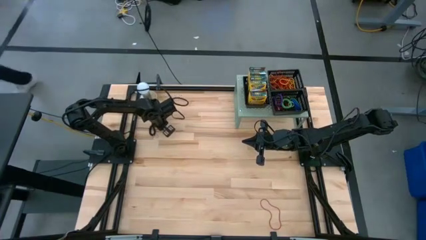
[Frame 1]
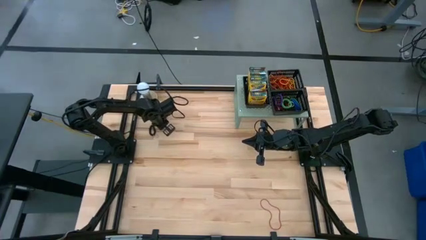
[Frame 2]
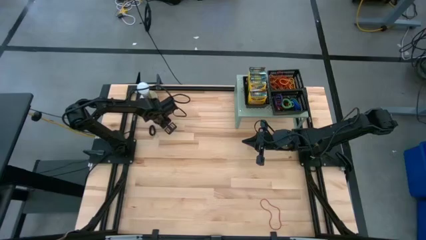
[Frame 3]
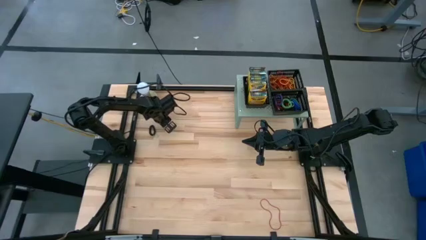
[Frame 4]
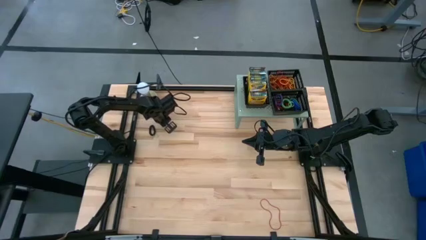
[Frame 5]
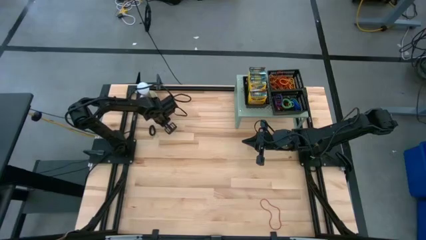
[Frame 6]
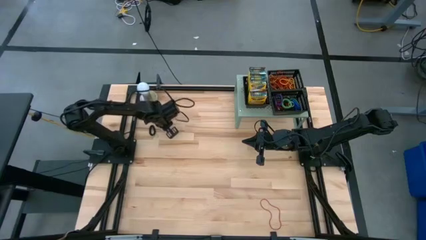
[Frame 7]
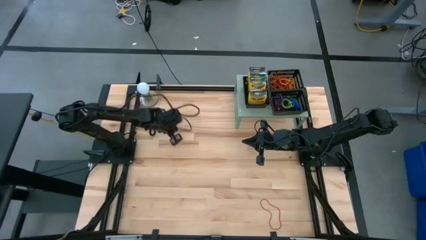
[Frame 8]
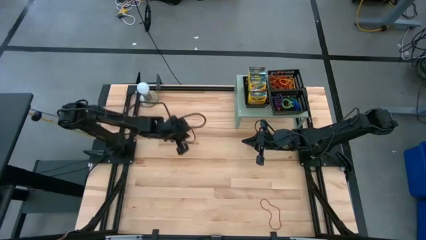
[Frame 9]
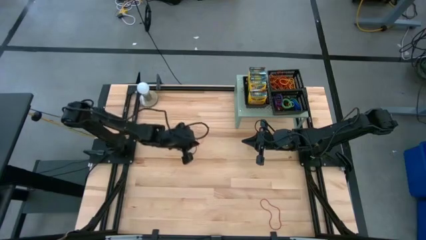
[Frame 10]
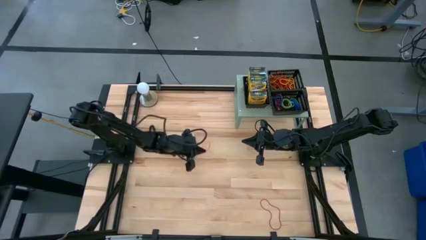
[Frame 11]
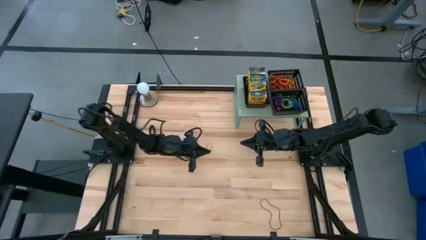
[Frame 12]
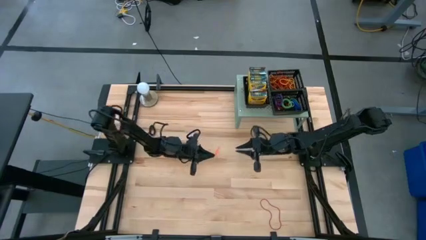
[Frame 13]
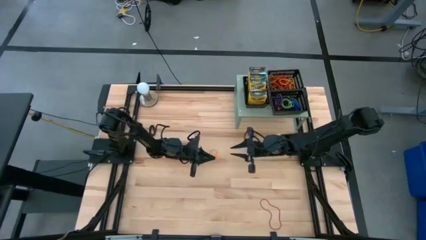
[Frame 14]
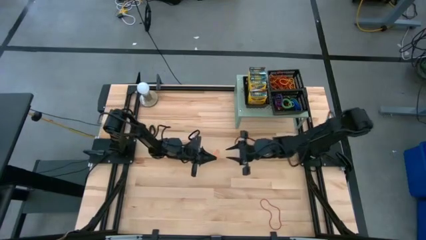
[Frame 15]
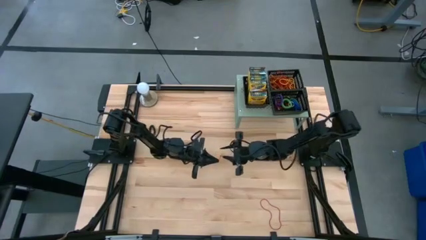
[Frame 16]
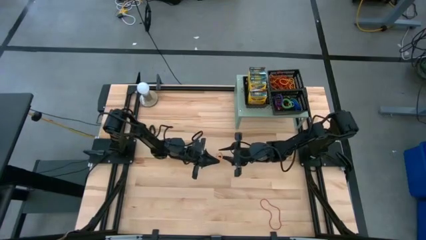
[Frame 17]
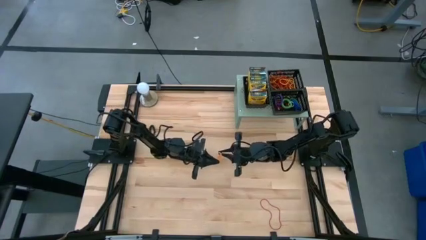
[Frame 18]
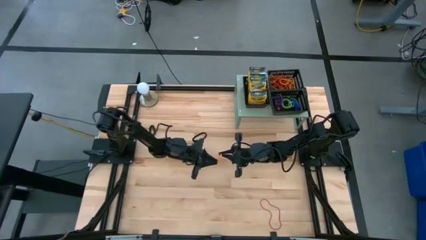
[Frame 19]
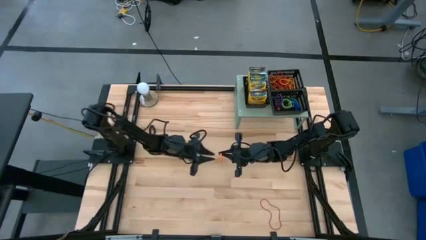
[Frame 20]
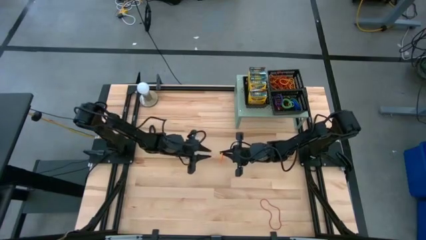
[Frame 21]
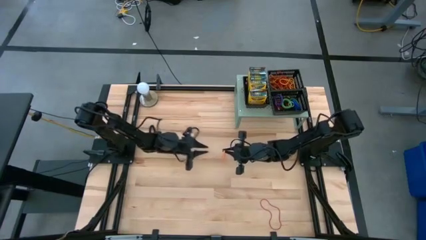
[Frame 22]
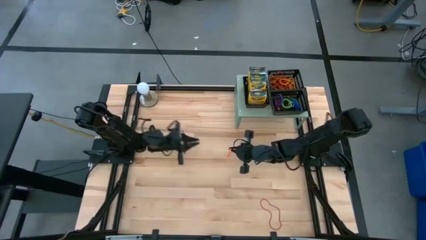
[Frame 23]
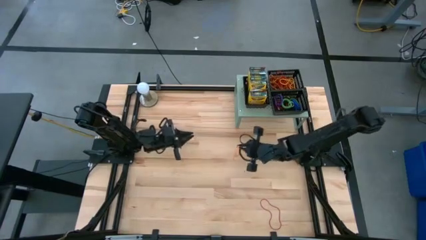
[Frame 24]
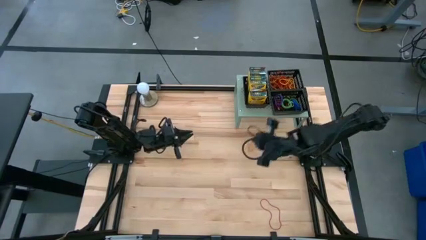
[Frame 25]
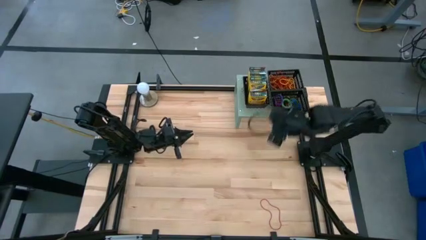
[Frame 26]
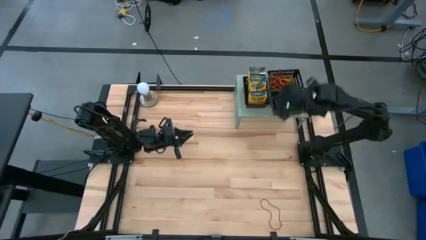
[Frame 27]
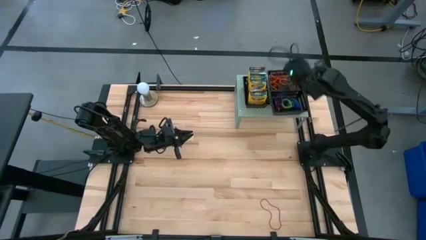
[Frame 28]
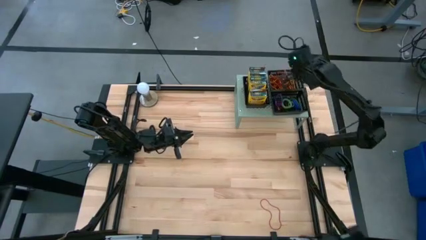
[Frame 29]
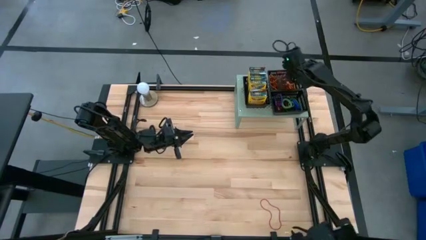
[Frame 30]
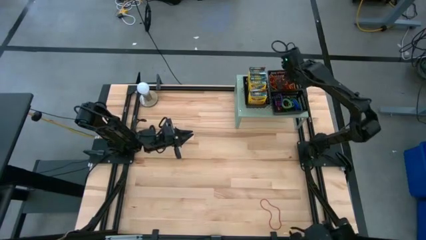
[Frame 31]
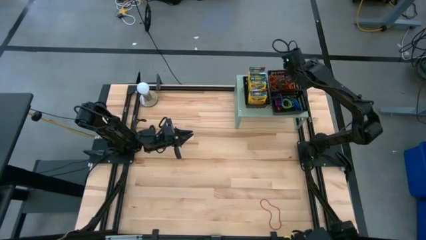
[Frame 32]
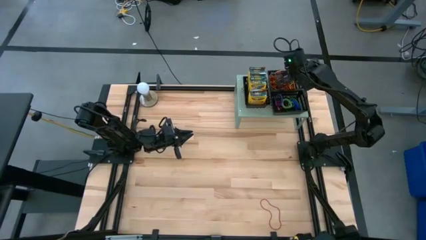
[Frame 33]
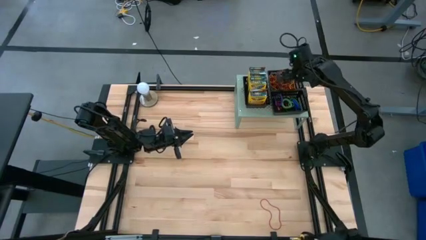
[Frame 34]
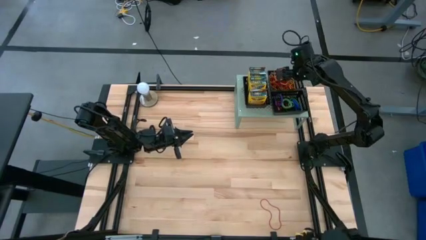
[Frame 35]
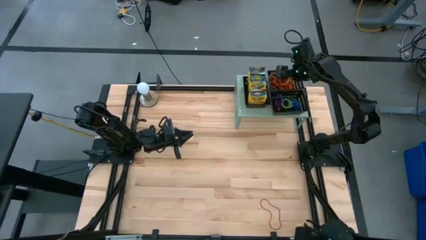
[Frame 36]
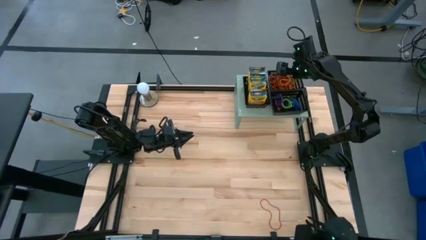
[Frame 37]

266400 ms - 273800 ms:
Task: Pick & Place Office Desk Supplies
Put the orange rubber band into the top right black bin on the shelf

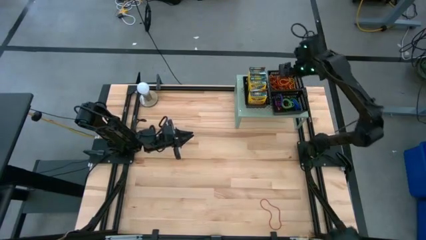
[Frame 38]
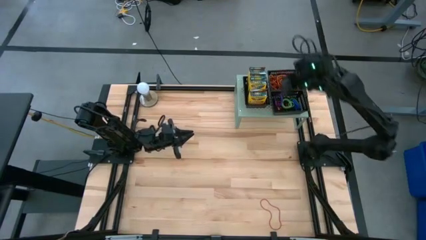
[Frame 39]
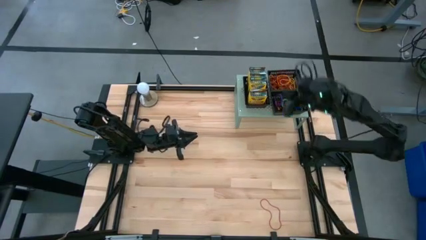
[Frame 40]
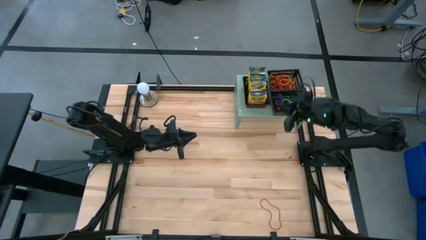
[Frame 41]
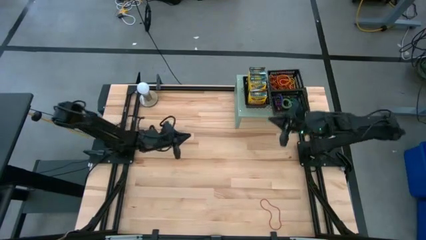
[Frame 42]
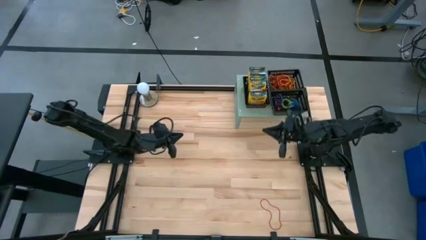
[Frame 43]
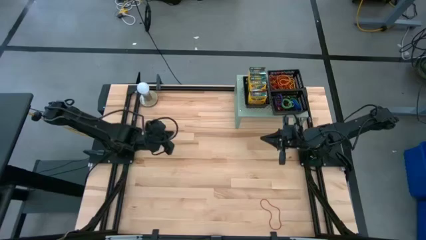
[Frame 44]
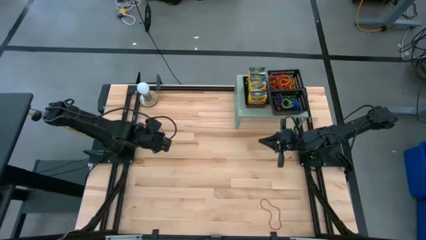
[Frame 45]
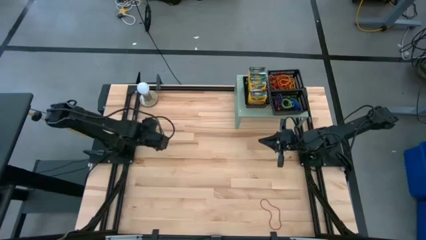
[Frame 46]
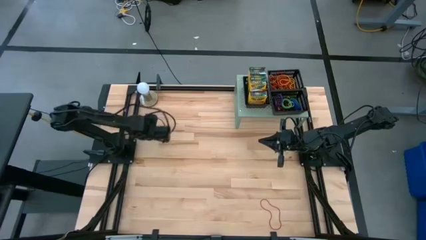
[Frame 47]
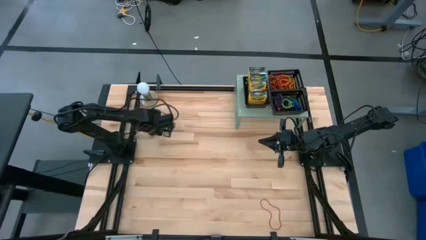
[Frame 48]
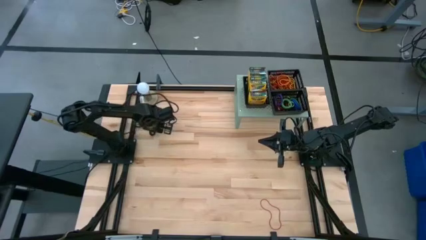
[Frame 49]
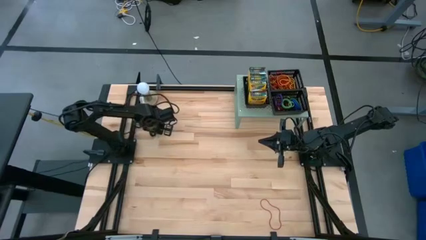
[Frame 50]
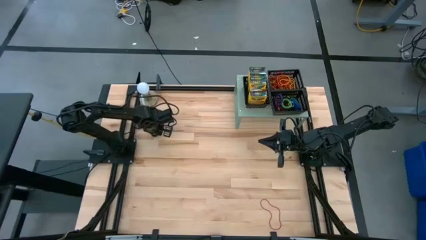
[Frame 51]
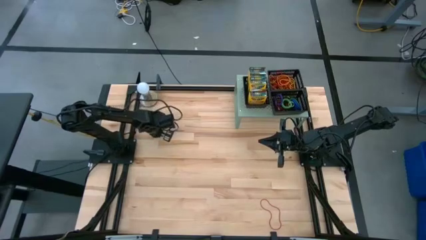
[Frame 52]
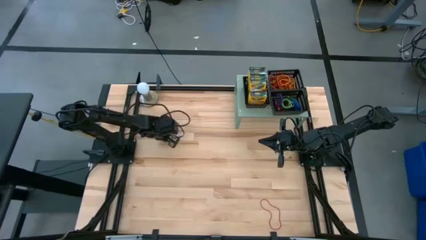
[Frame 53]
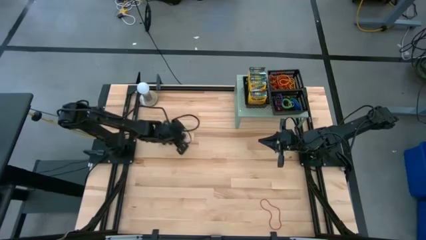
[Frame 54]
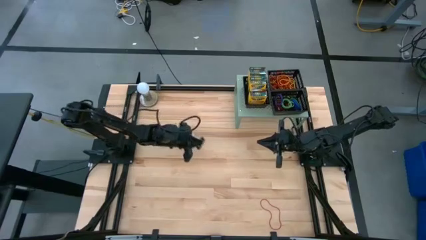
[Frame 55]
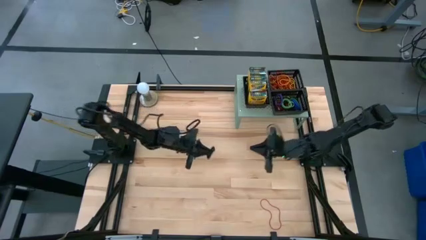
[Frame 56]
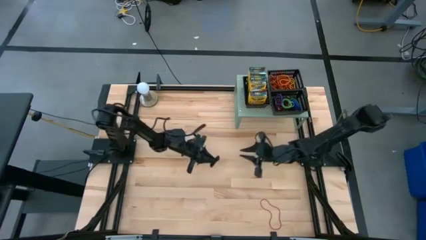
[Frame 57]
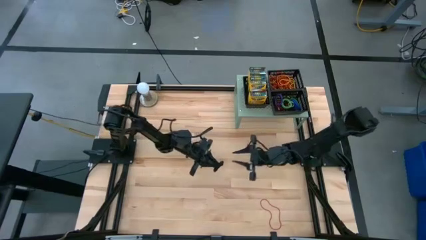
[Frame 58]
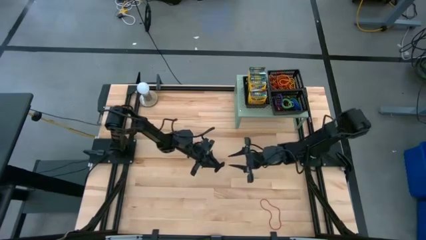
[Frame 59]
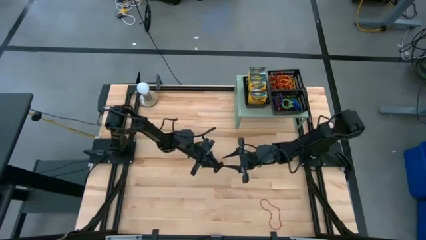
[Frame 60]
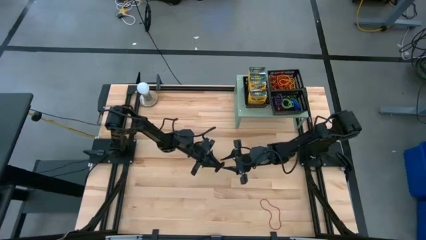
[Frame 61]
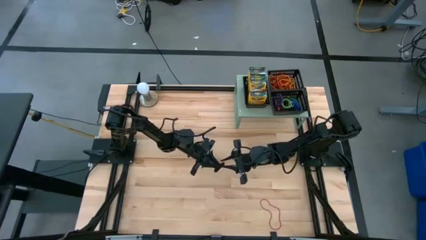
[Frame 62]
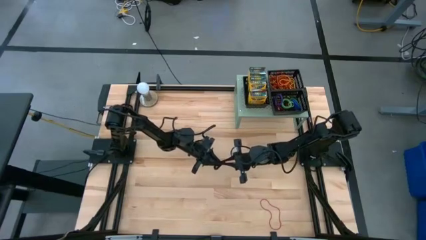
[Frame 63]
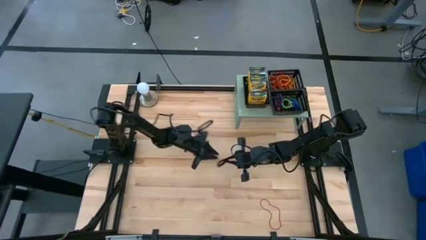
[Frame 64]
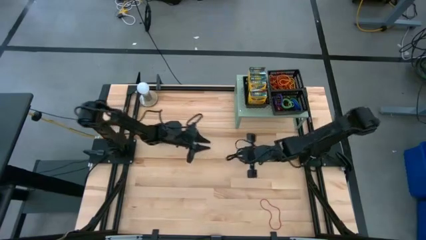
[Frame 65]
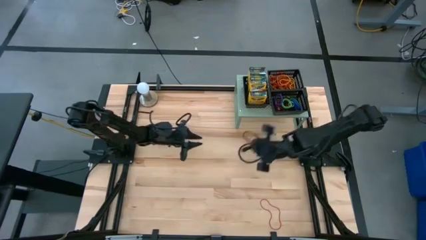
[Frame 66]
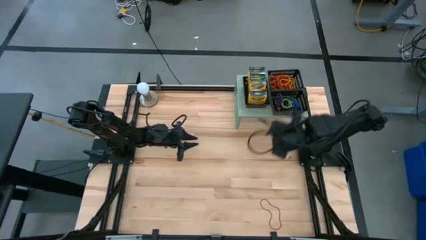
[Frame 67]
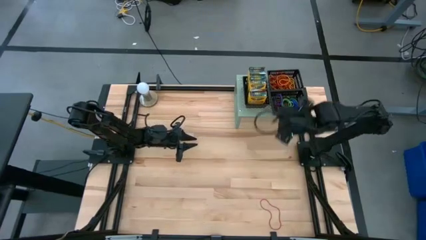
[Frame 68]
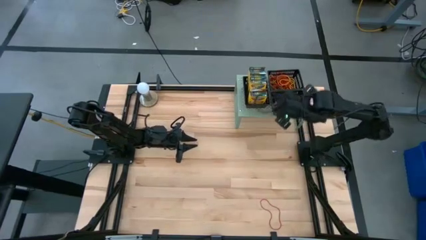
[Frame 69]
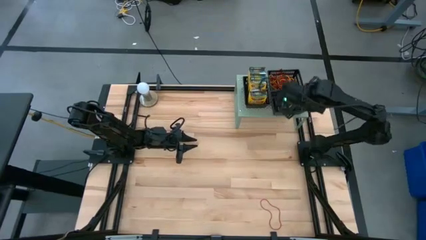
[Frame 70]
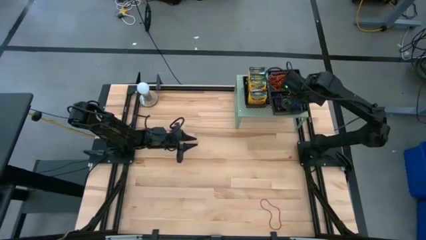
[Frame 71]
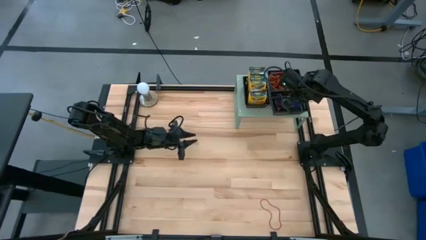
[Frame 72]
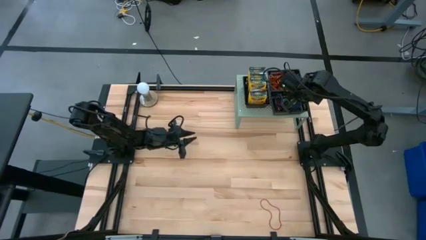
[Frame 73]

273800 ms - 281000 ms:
Put the black spring key chain into the bottom black bin on the shelf

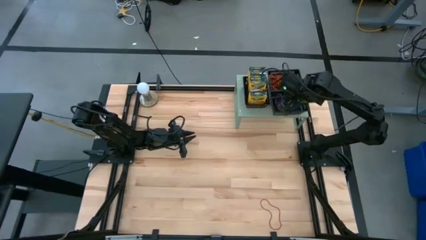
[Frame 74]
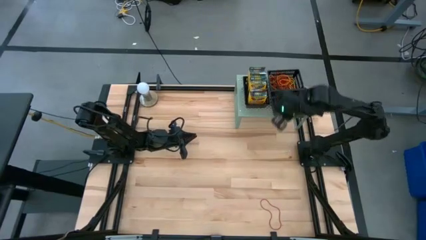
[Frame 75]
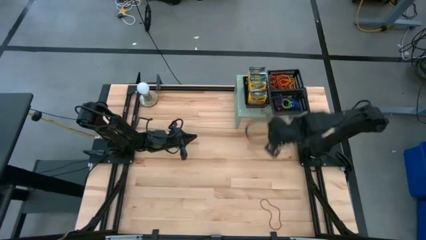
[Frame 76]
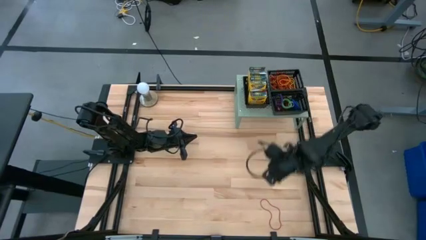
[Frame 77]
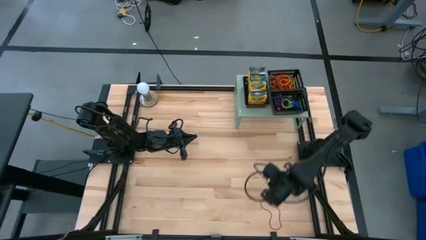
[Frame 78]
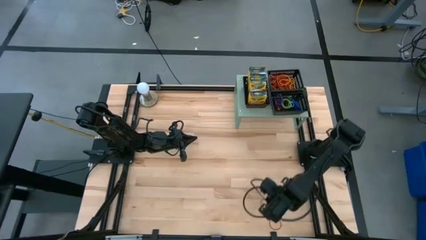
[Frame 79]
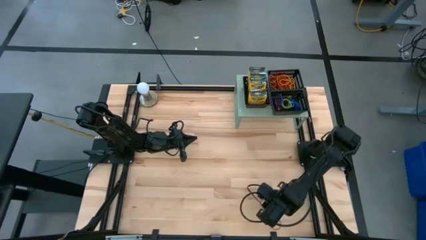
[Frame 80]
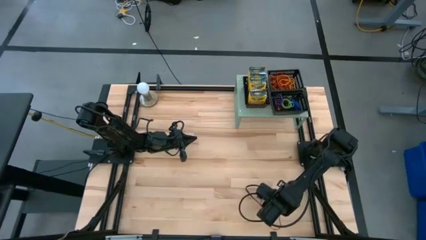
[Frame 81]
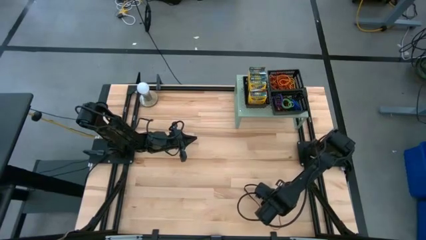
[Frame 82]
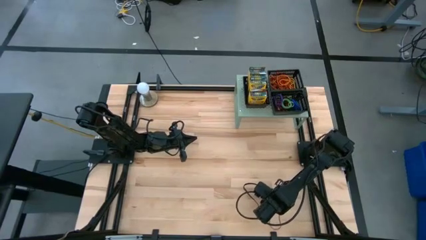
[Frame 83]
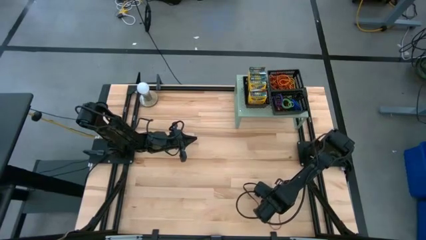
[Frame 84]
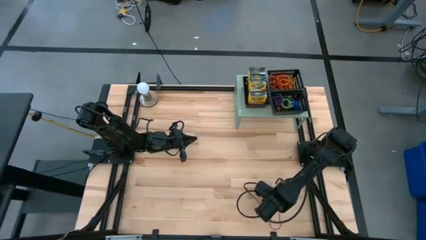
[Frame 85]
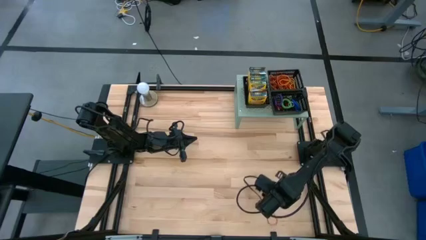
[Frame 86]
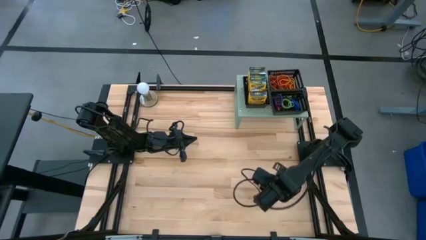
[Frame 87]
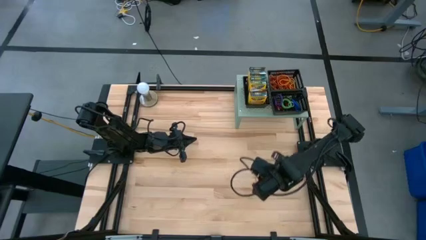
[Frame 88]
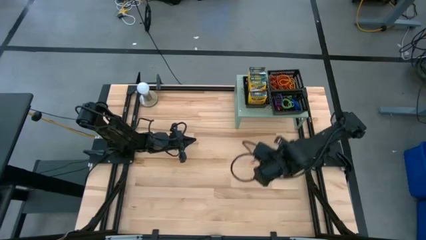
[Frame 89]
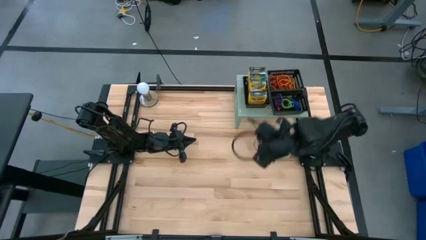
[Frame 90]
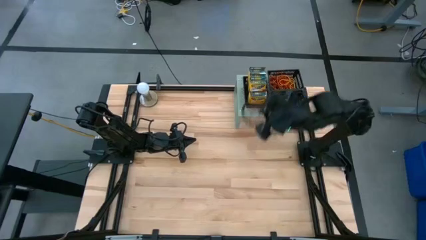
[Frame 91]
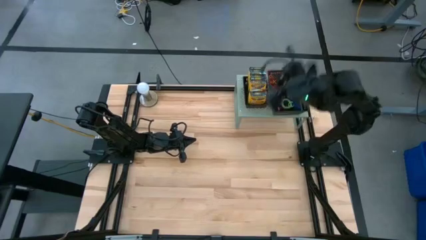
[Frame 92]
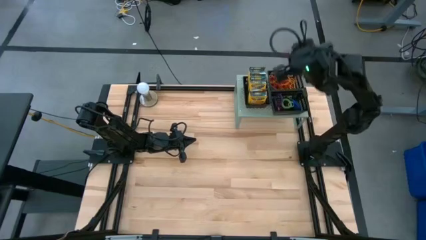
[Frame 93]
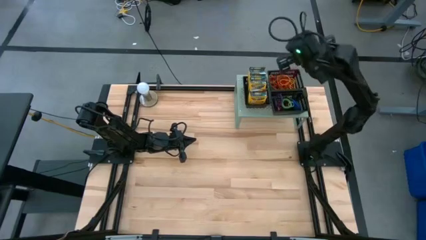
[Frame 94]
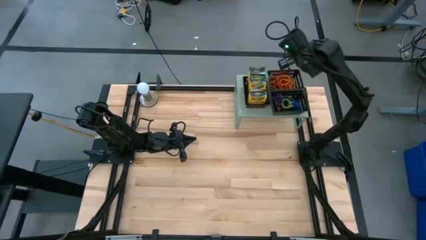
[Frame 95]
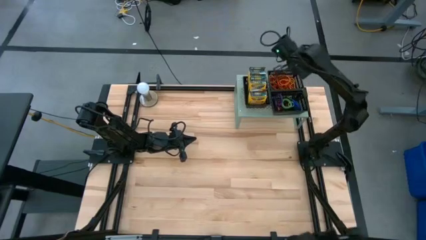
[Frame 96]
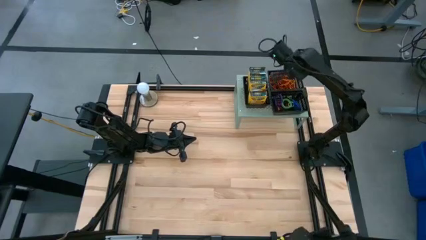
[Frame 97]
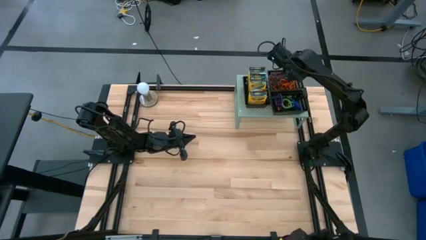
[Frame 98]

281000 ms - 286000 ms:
Put the red rubber band into the top right black bin on the shelf
